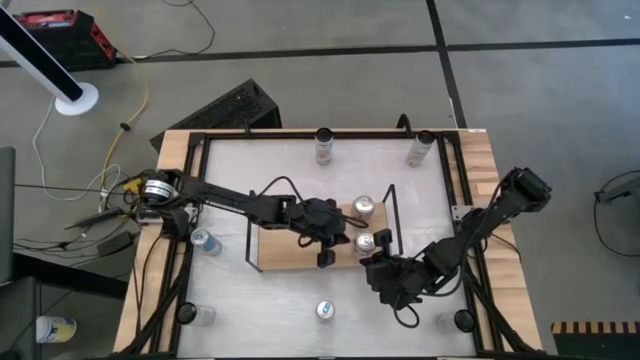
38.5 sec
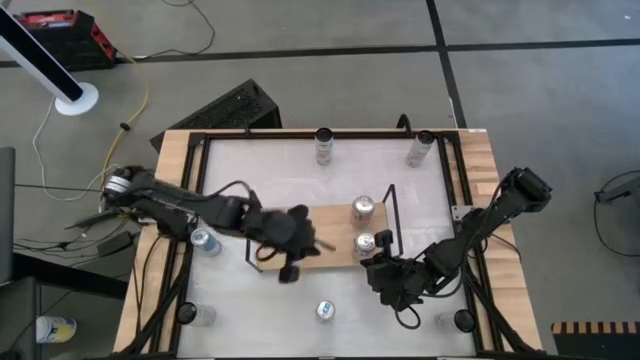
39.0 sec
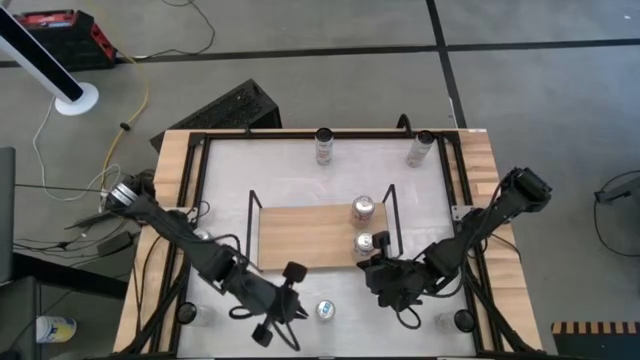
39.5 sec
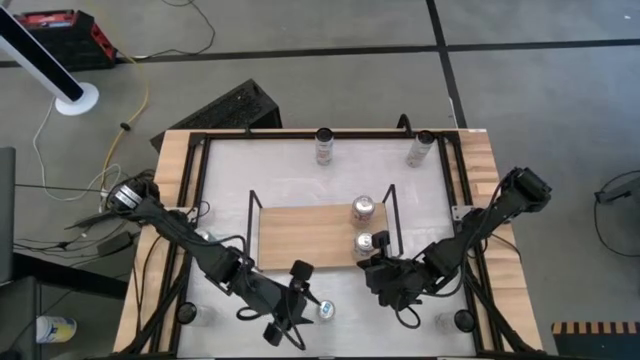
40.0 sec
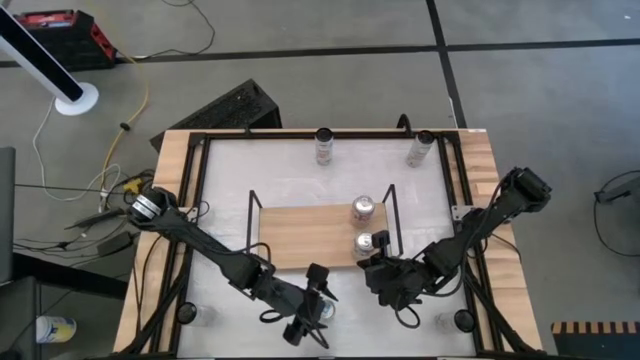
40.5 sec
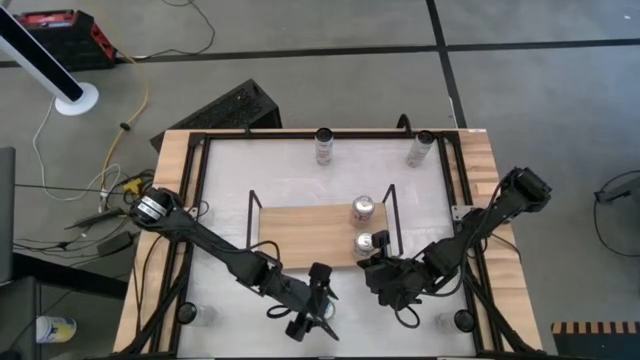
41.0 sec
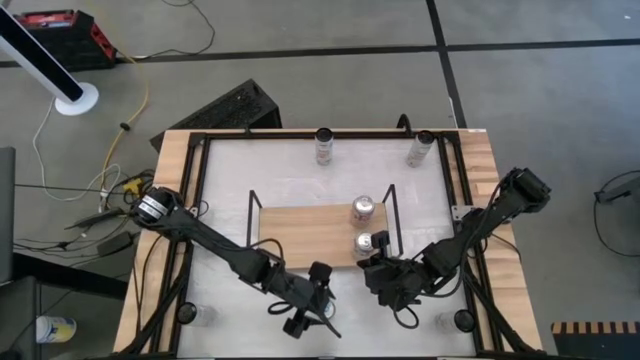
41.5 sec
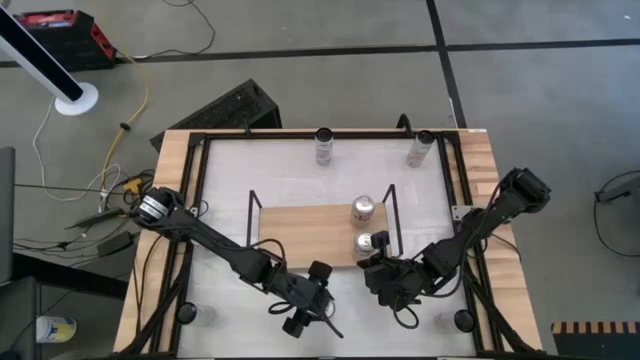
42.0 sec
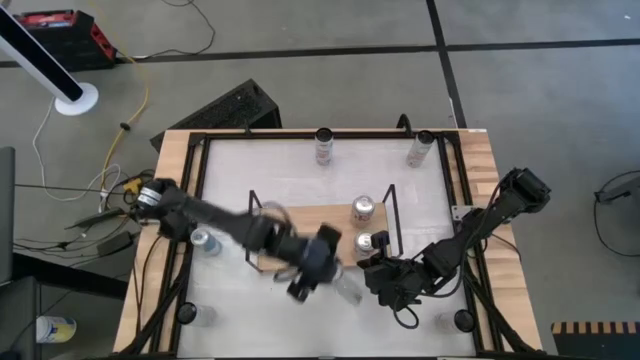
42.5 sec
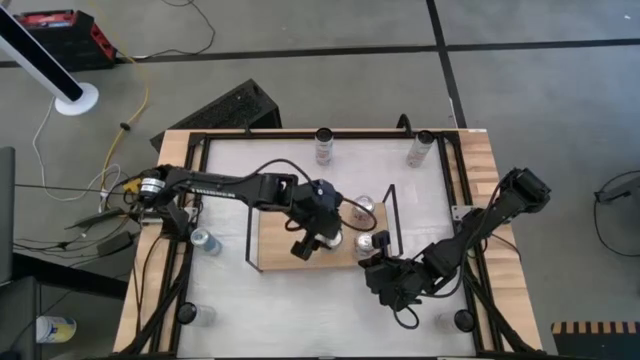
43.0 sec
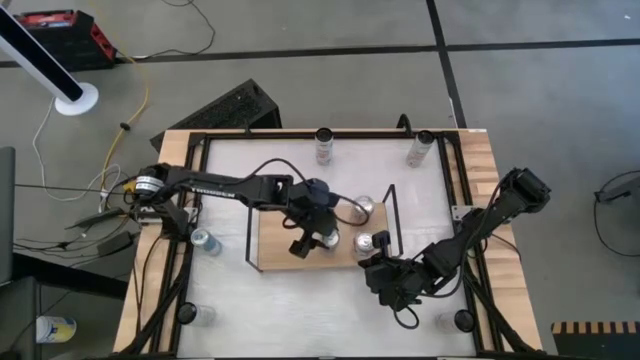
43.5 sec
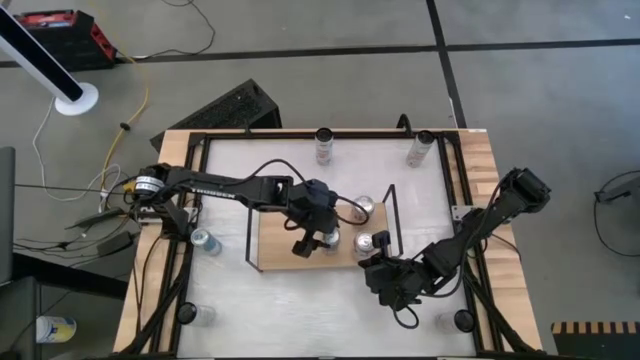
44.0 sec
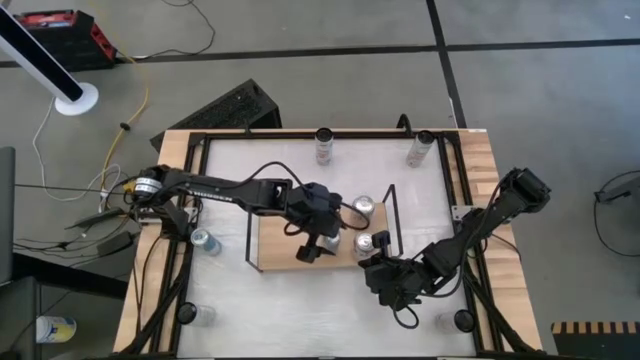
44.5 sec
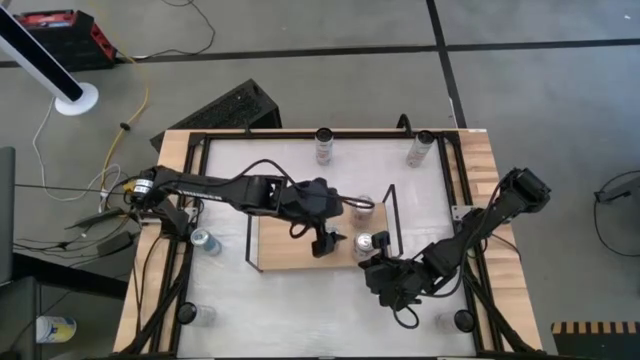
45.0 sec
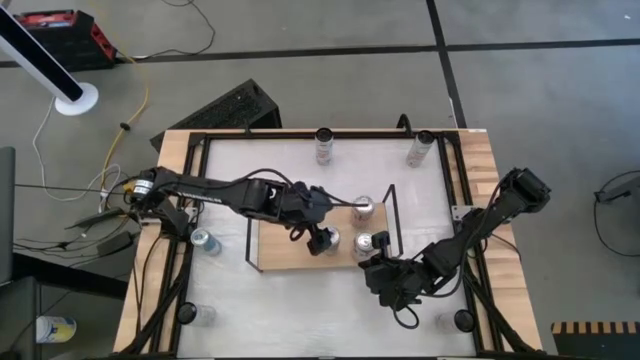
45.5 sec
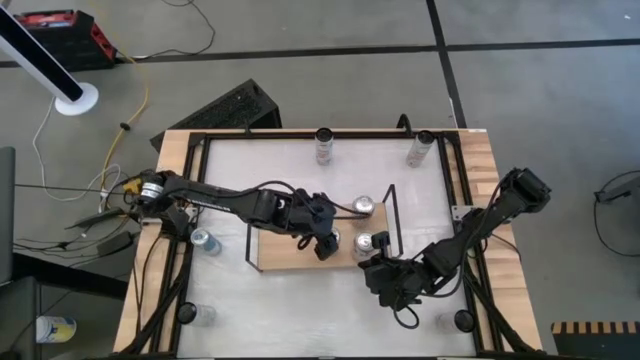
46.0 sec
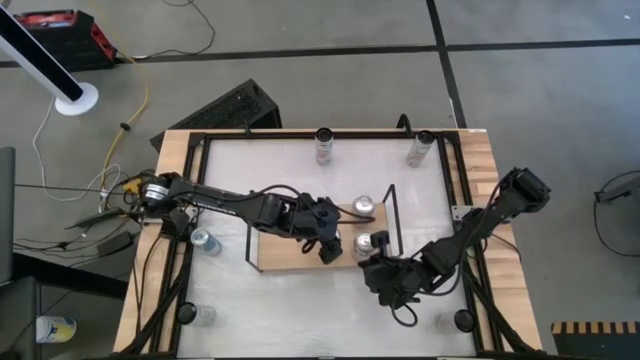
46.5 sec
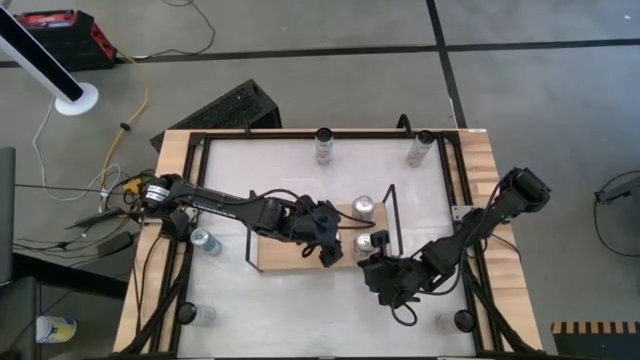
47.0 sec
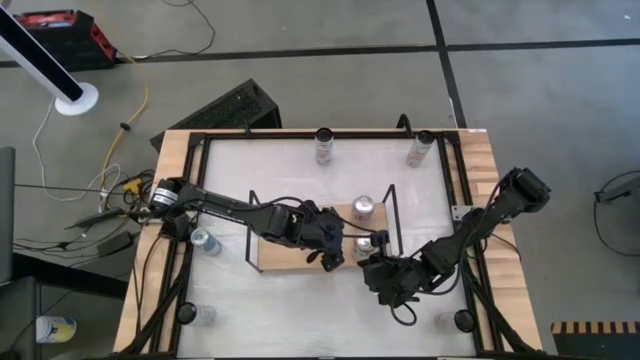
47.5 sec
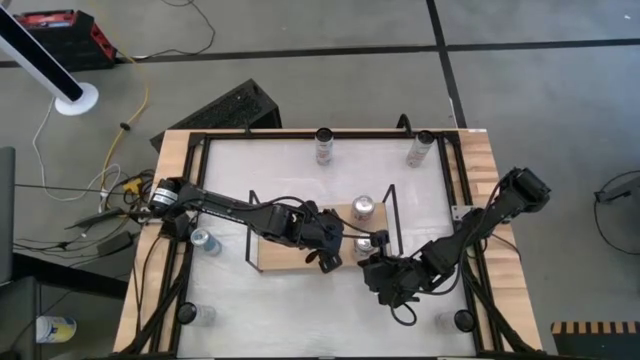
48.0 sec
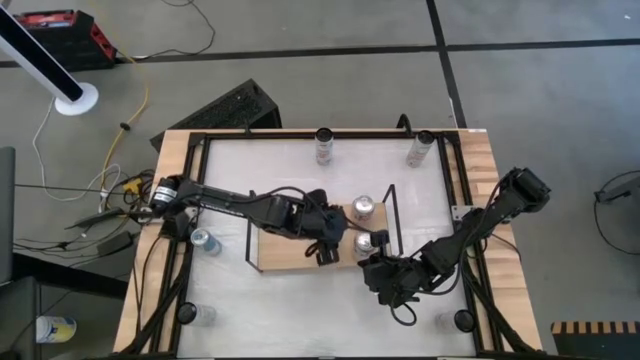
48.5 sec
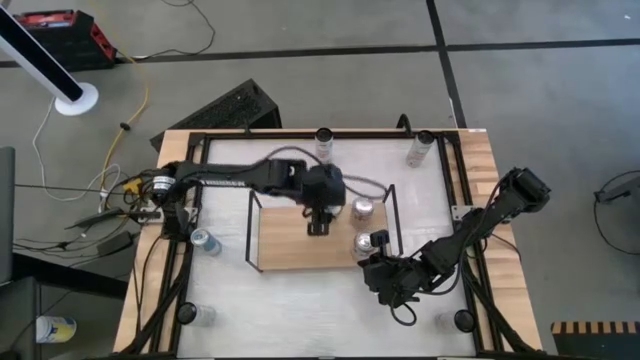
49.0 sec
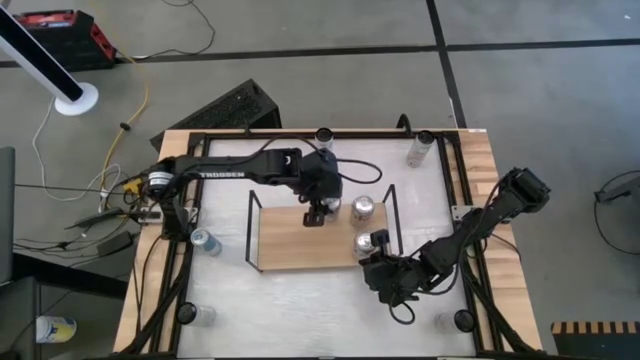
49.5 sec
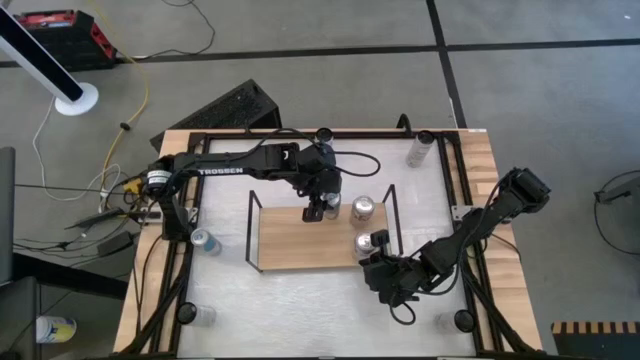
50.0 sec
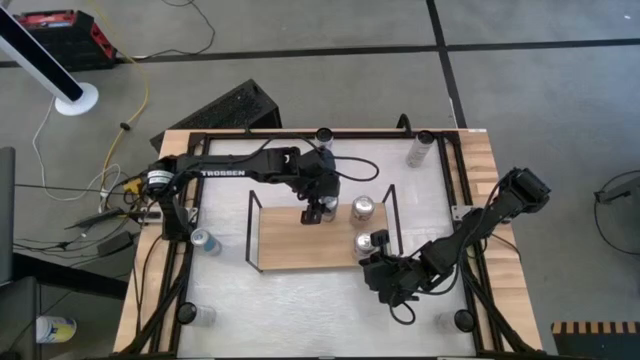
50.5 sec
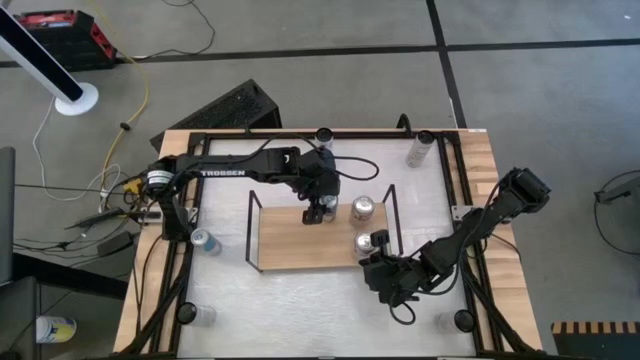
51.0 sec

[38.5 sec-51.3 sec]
Task: Place canned beverage on shelf
Put the bottom blue soda can on the shelf

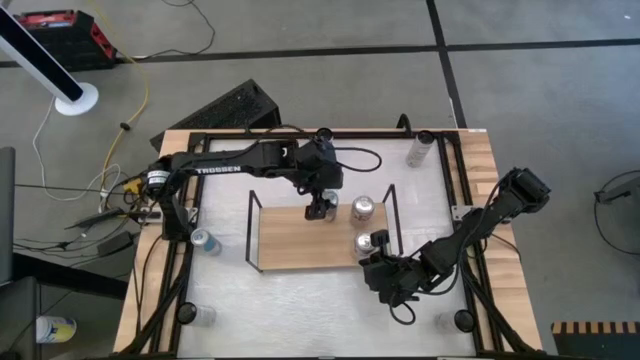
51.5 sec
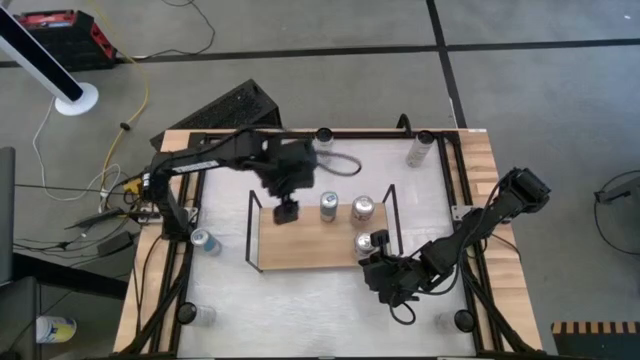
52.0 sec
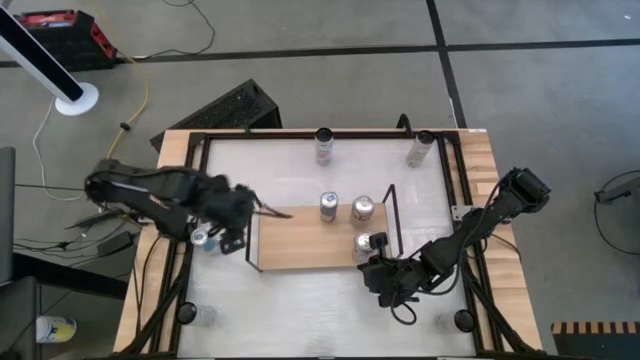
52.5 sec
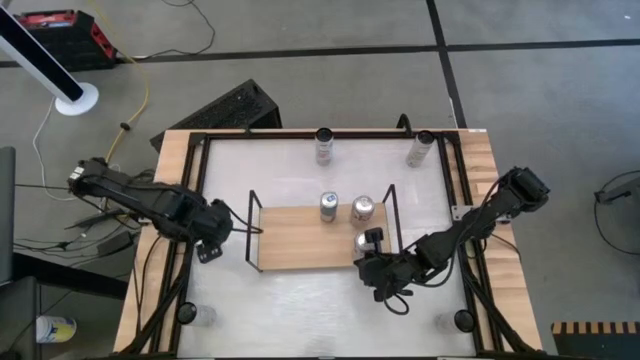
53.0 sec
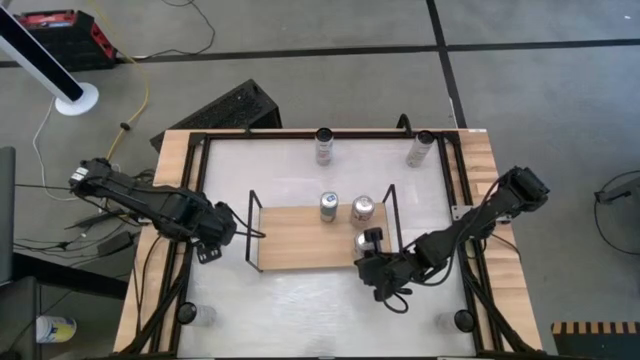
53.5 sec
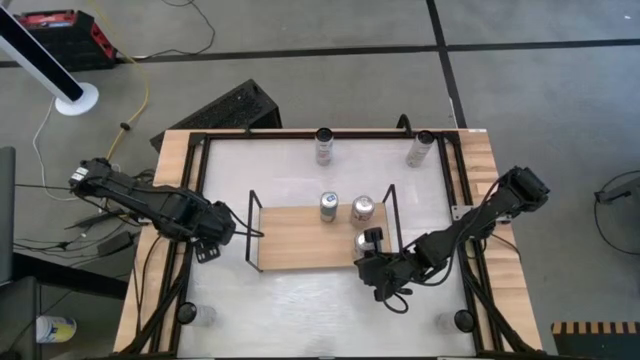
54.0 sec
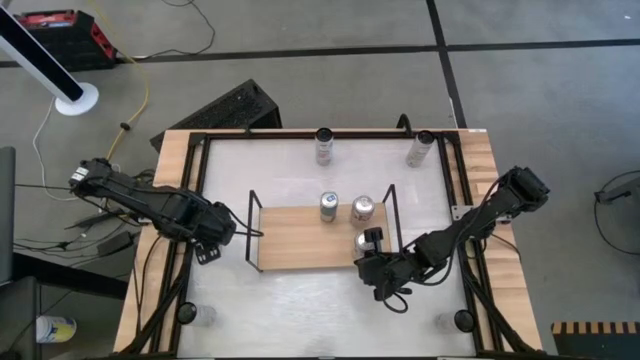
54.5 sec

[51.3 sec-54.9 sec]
Put the blue soda can on the shelf aligned with the other blue soda can

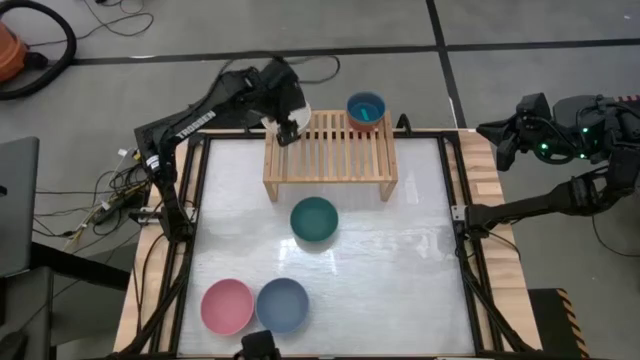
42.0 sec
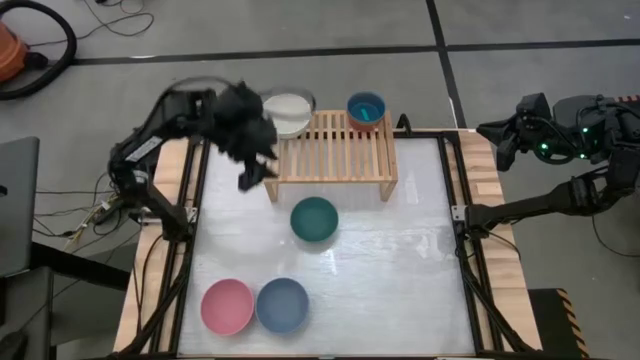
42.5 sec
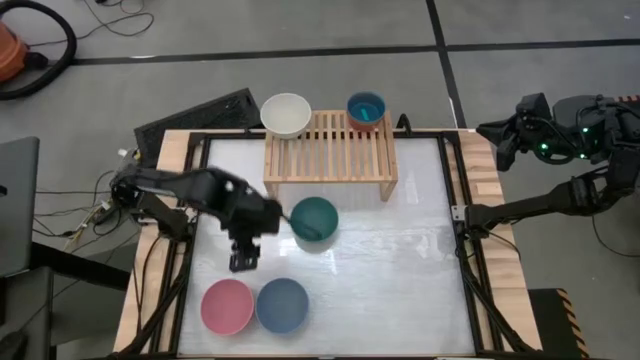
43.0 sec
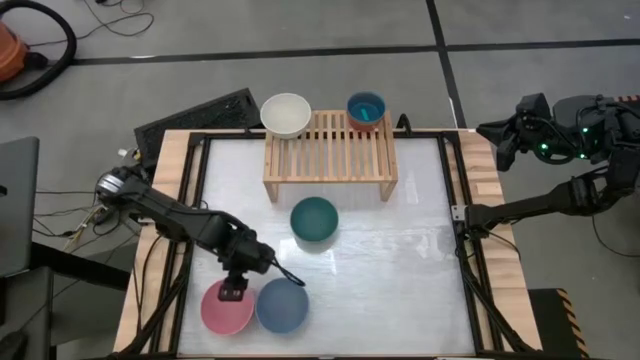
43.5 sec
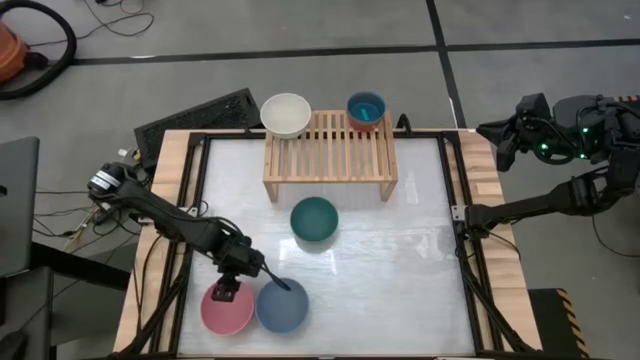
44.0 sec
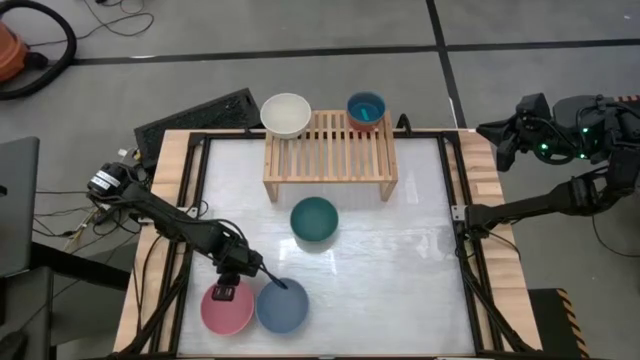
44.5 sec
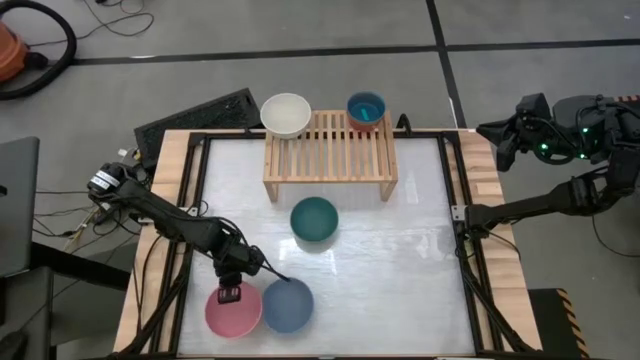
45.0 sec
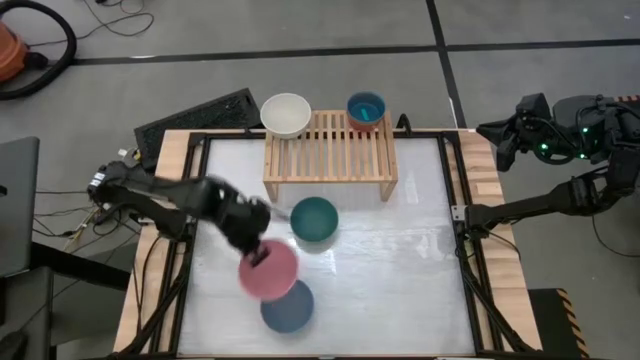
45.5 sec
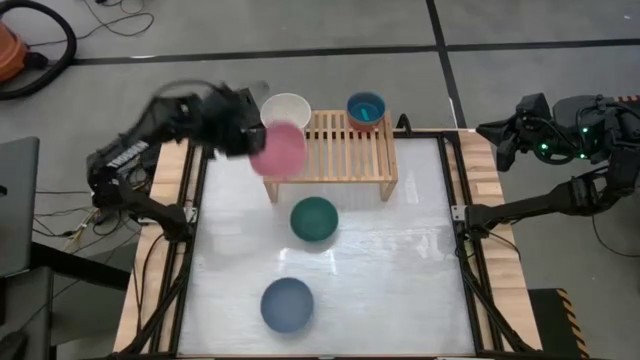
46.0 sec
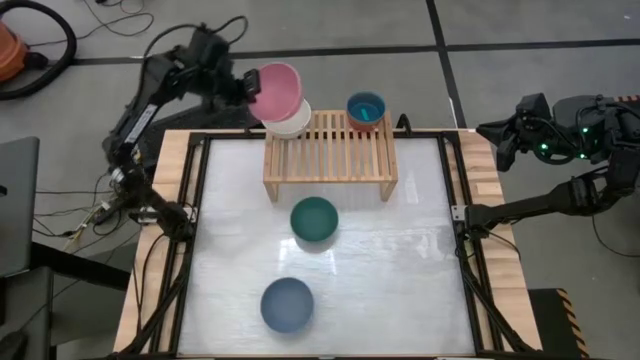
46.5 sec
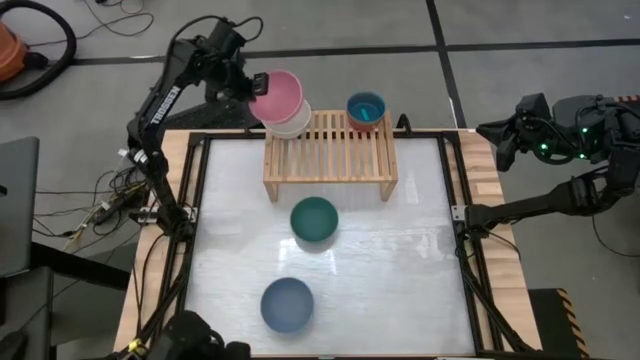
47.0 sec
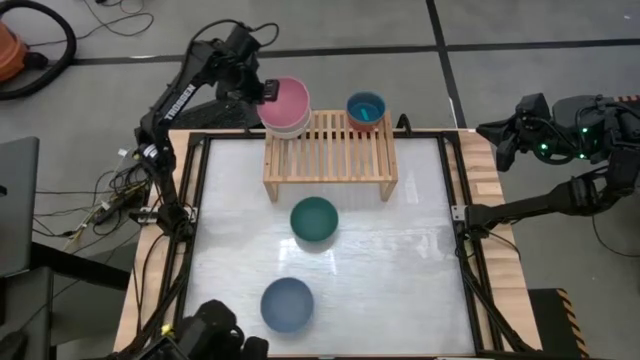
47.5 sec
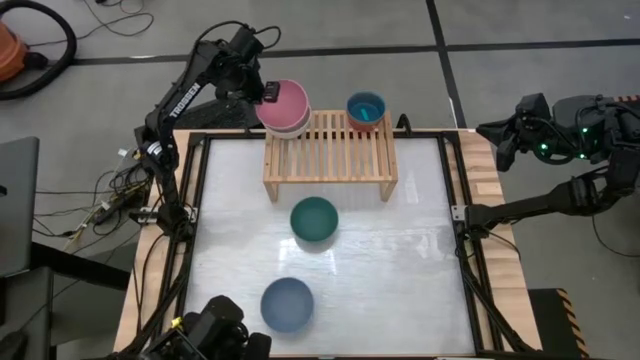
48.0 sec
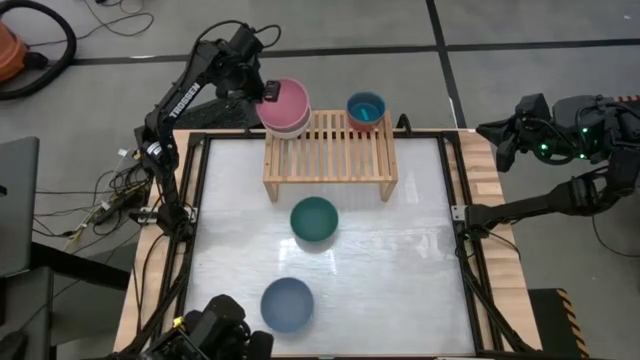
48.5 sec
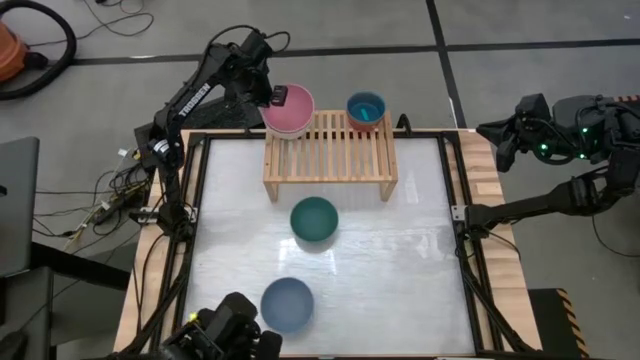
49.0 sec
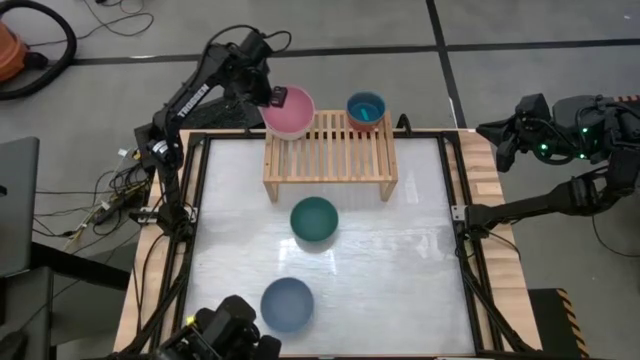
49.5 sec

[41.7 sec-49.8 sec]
Task: Place and stack bowls onto a shelf
Stack the large pink bowl on top of the large white bowl
